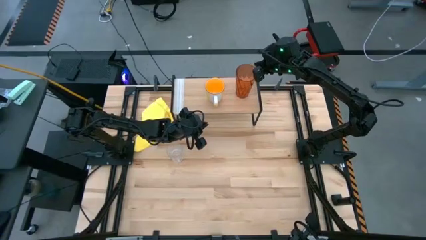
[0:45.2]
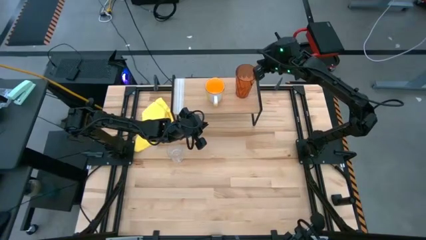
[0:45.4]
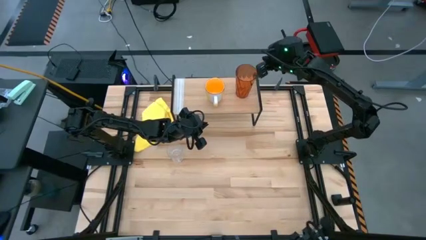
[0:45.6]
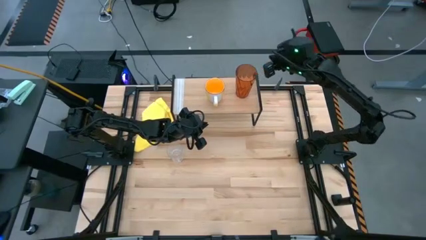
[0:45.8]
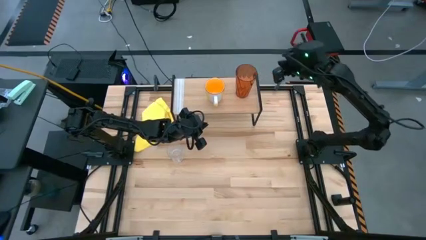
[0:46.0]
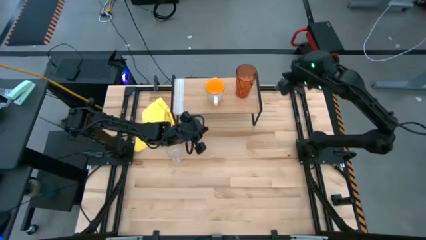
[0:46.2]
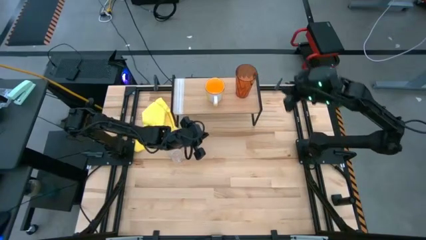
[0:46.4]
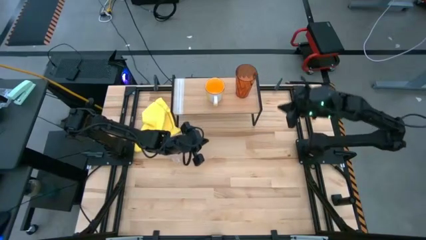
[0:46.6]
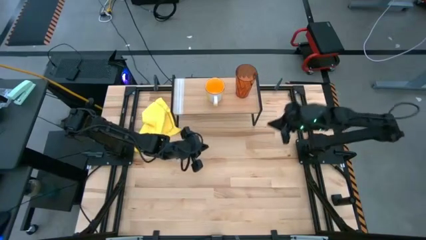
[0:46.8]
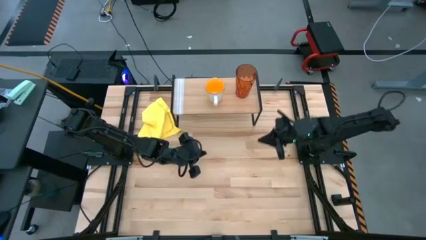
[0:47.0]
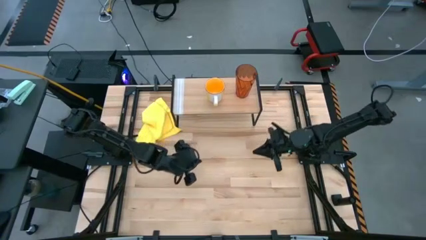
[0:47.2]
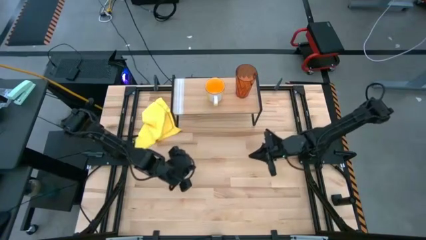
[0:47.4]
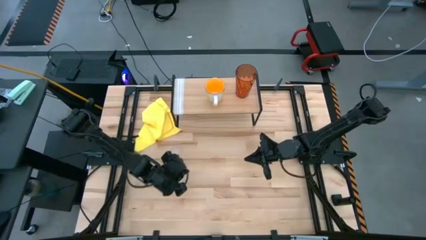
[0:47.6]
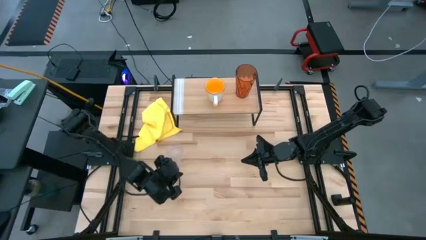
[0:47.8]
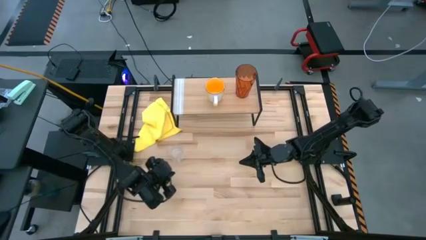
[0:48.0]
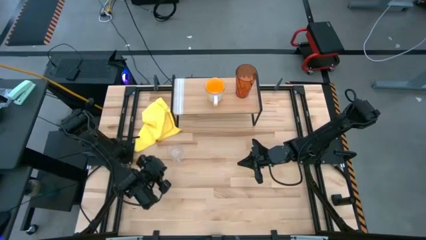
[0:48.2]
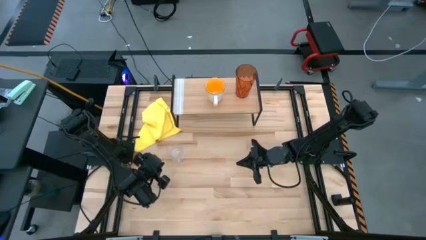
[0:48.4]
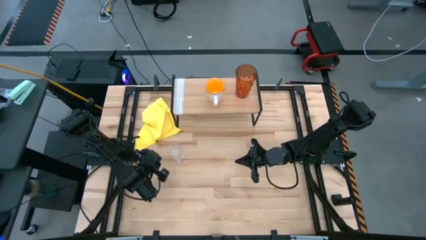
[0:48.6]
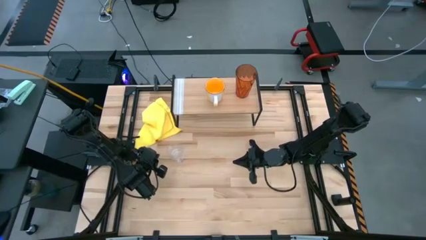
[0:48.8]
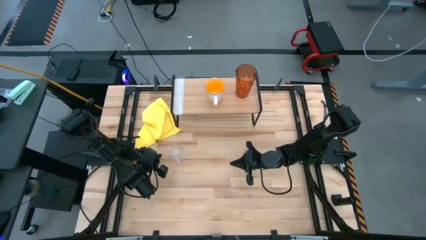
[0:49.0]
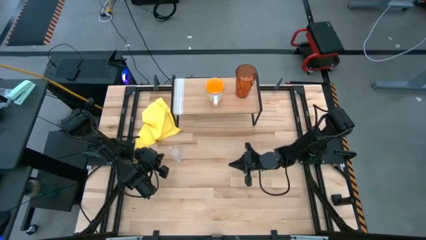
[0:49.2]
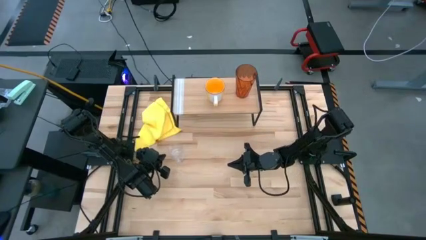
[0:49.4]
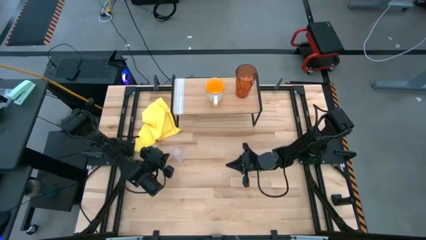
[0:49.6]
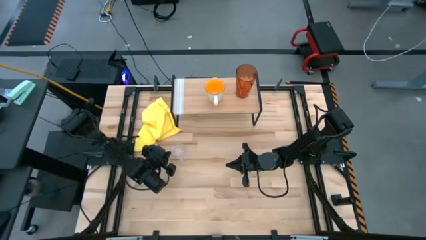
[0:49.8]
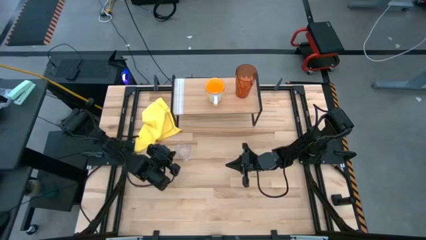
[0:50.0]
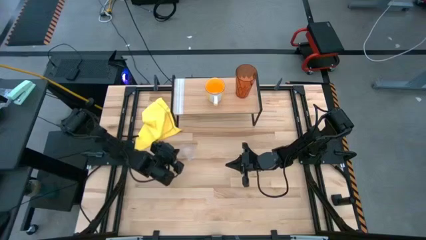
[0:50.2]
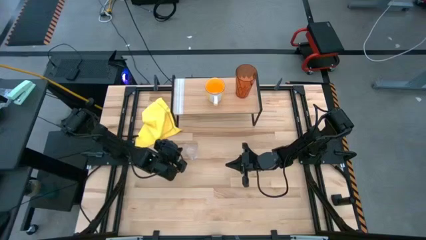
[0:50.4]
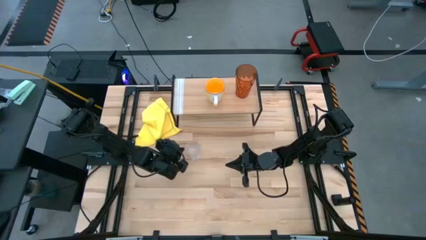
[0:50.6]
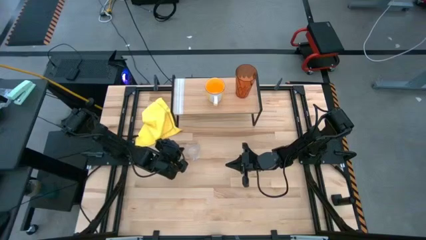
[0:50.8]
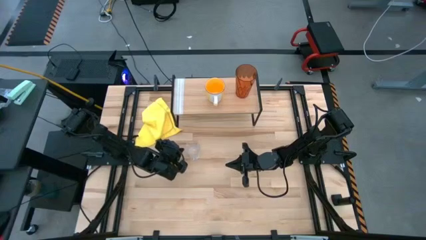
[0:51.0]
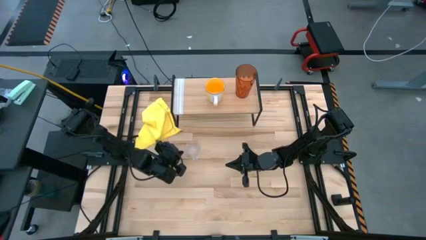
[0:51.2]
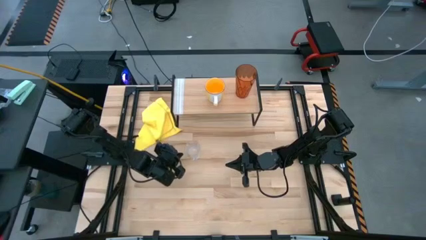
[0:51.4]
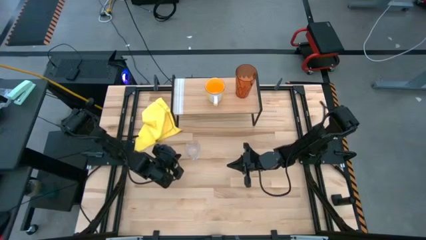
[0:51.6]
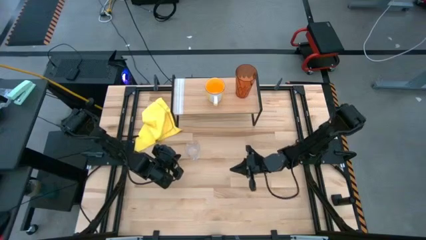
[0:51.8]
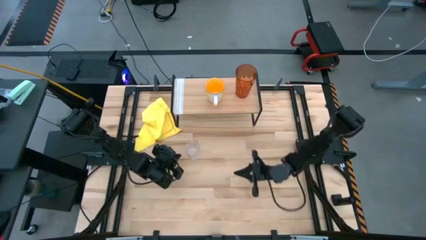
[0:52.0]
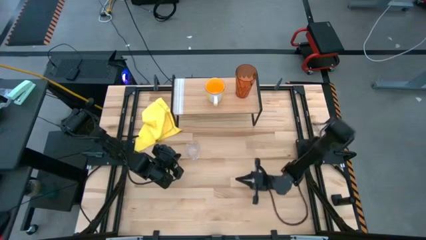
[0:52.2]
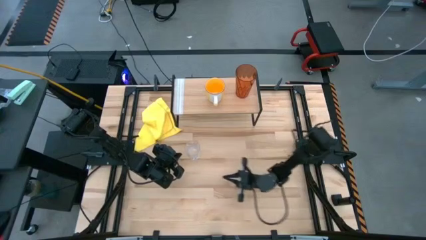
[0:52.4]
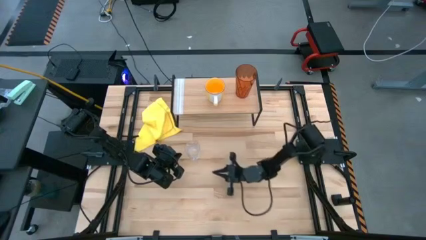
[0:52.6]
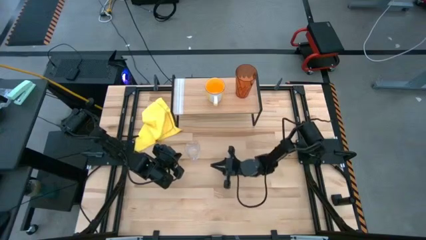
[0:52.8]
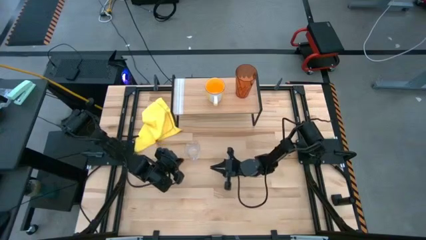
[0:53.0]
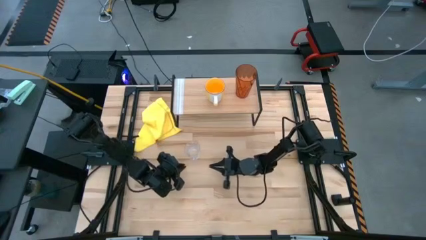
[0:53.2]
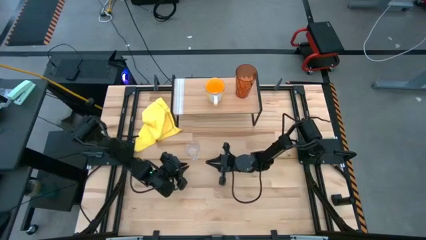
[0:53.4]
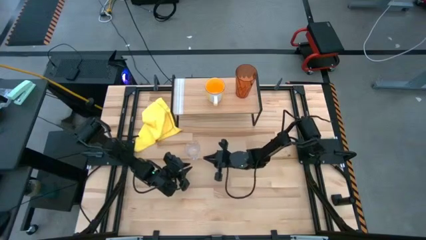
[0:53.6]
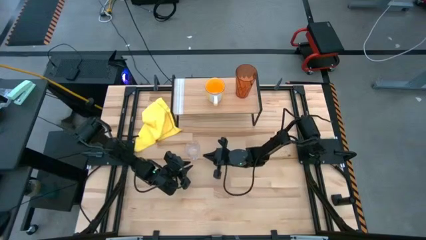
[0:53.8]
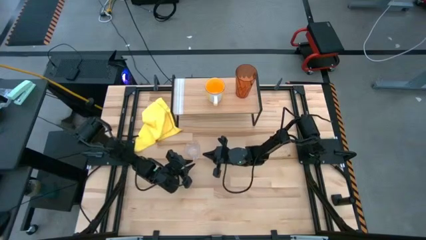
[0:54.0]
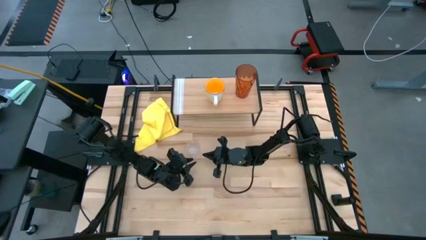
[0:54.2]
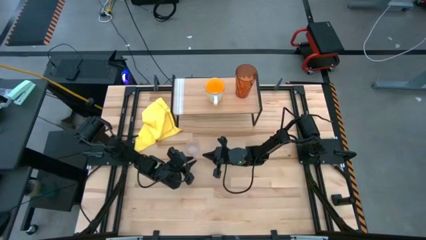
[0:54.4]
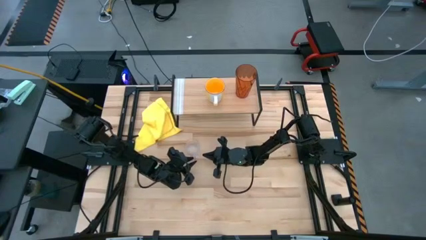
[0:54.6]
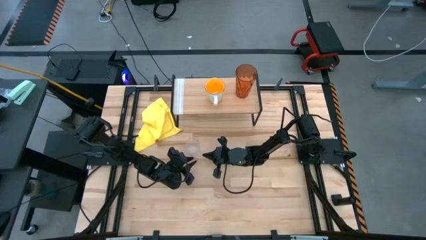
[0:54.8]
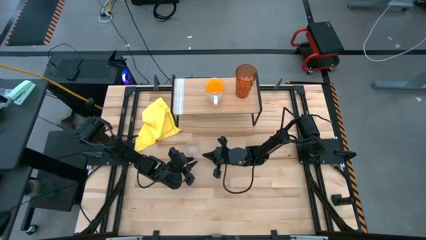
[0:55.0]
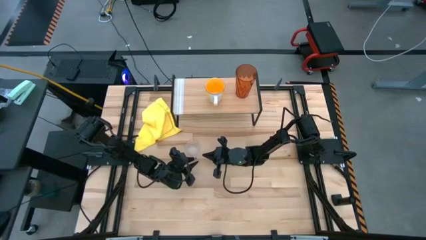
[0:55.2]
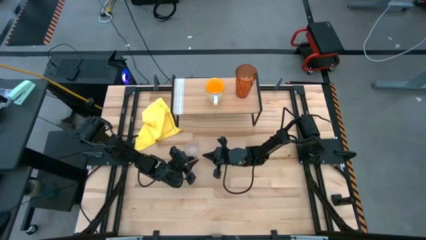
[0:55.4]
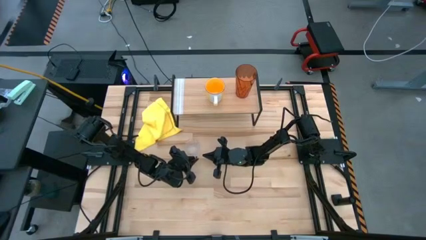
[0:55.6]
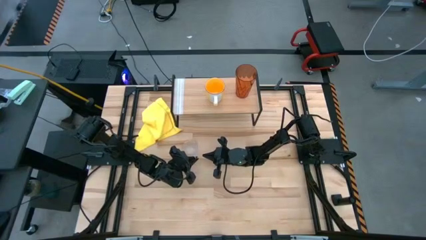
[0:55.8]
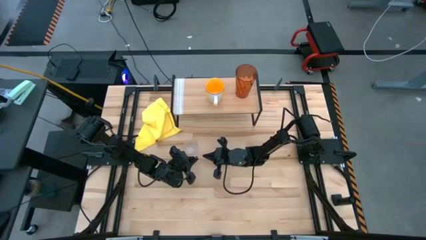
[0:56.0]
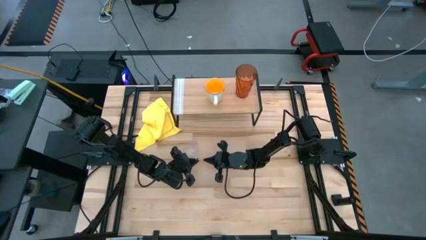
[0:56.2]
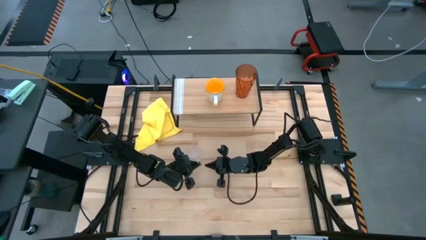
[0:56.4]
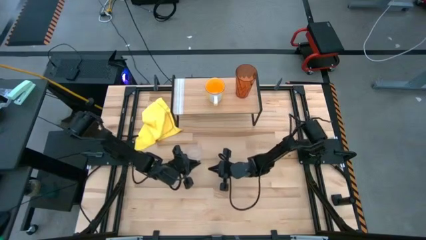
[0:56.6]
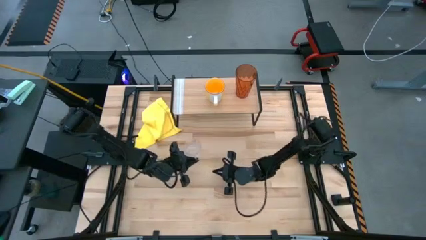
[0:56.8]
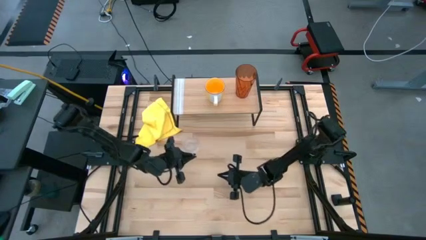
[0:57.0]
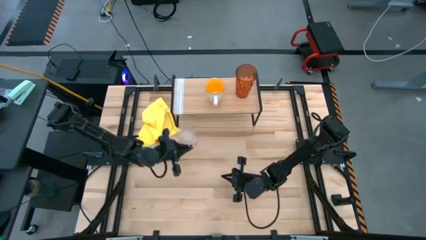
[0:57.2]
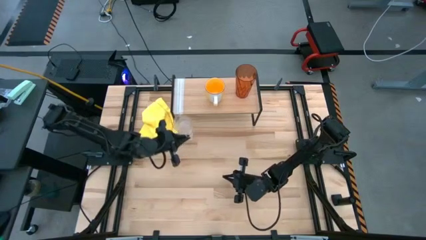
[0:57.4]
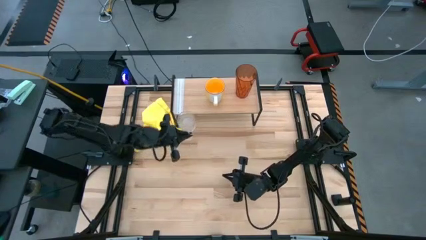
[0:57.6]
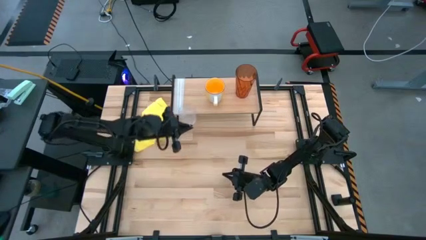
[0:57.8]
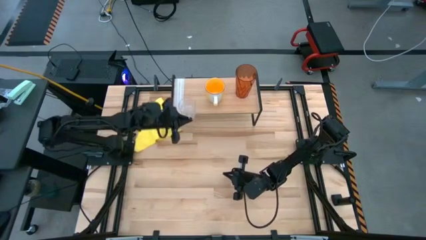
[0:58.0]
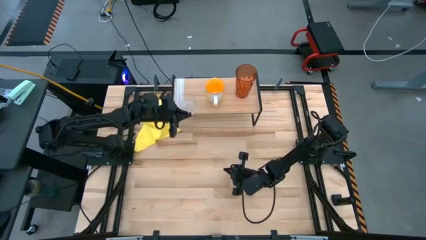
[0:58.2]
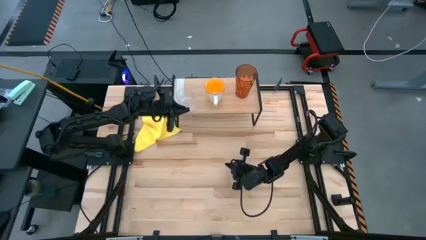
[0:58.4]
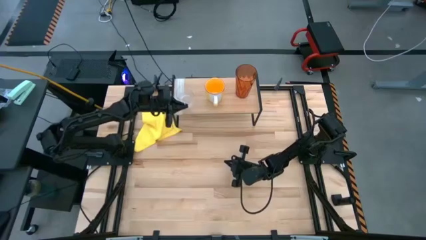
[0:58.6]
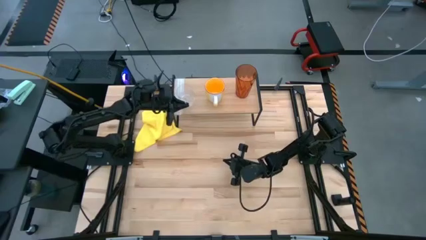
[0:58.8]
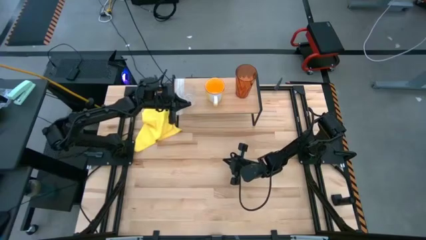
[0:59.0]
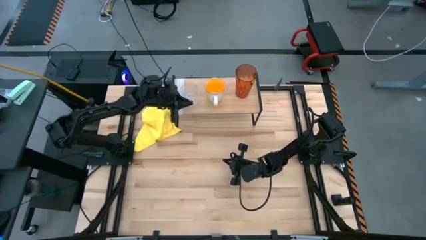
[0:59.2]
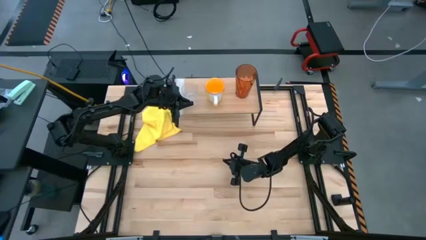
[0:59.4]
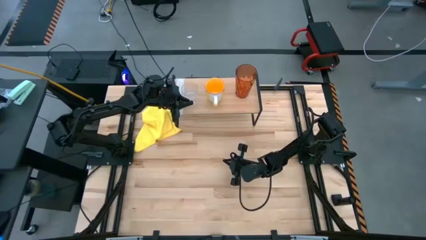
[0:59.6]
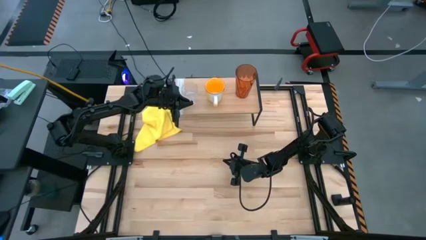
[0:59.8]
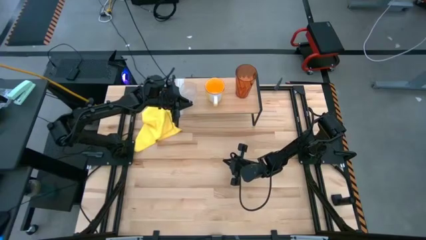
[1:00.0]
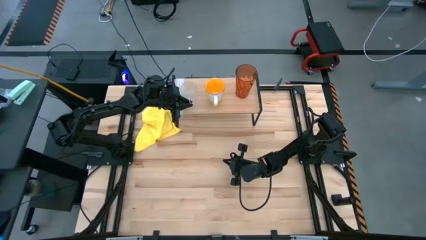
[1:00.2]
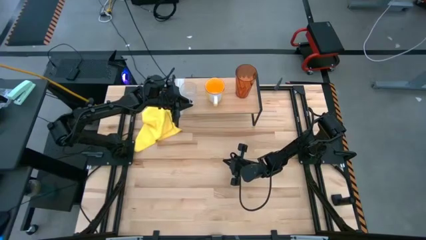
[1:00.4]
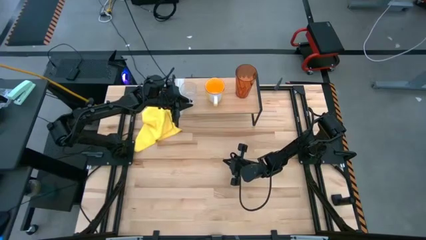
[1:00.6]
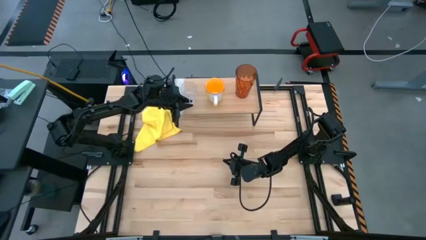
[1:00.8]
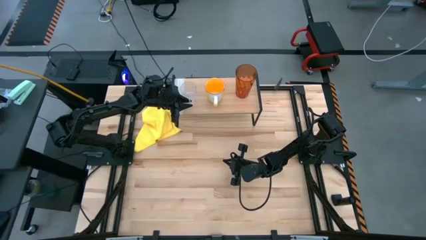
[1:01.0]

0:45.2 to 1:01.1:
Task: Stack small to large cups/mugs on shelf
Put the transparent mug on the shelf

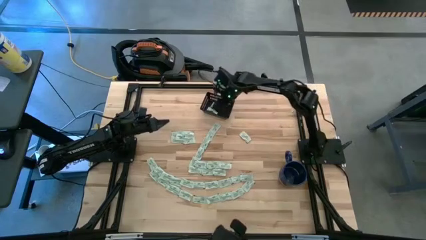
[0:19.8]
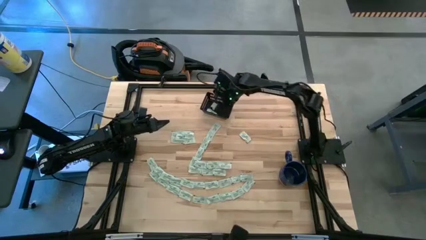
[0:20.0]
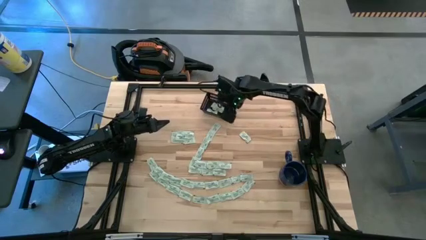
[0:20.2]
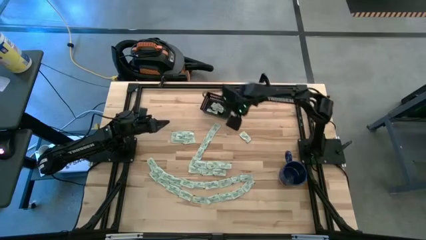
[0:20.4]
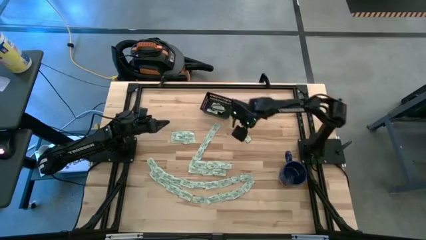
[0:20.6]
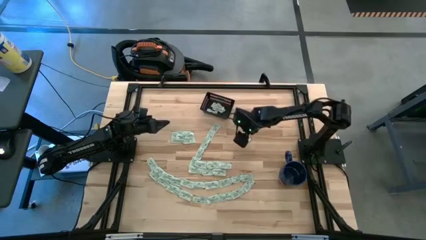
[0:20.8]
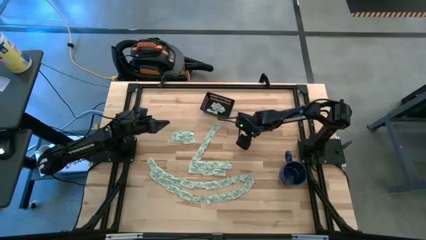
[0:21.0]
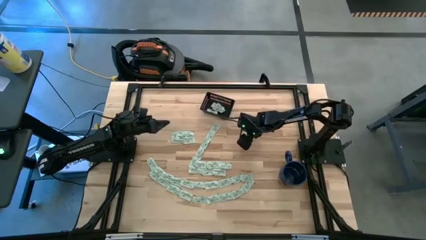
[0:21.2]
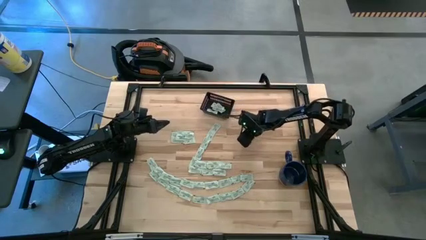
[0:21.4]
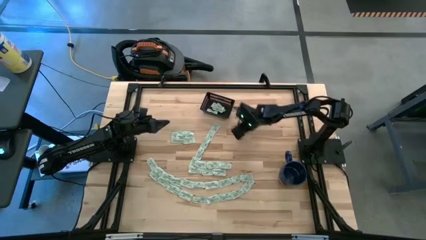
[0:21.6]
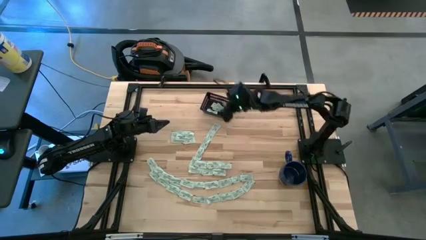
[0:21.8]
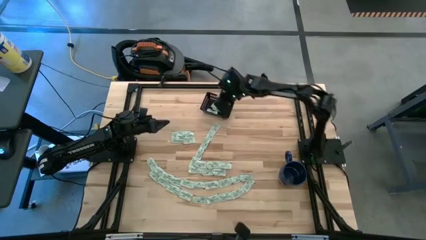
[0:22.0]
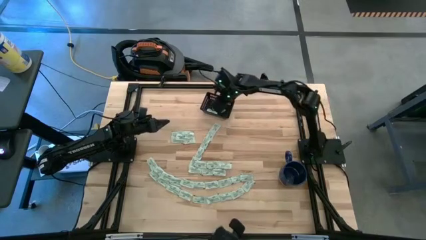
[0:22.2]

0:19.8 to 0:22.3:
Task: Pick and place Stevia / Truvia into bins
Put the stevia packet into the black bin
